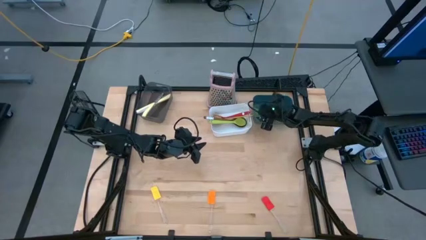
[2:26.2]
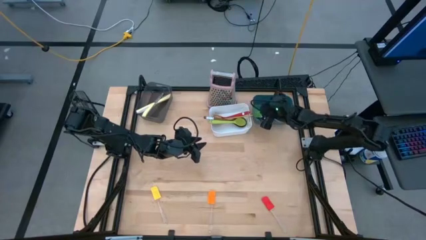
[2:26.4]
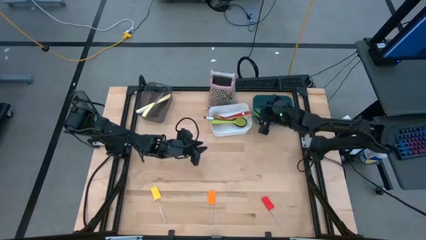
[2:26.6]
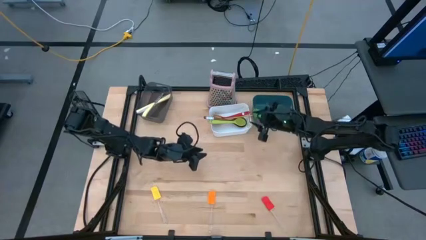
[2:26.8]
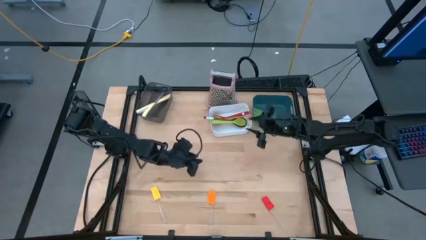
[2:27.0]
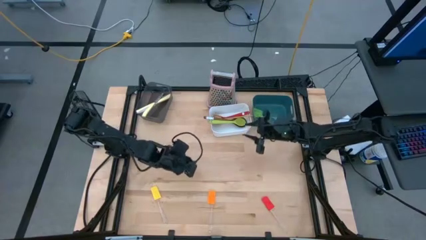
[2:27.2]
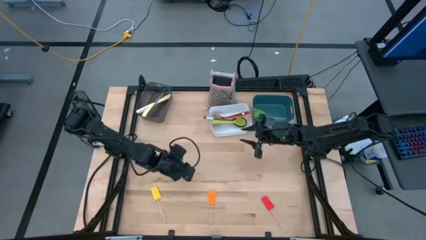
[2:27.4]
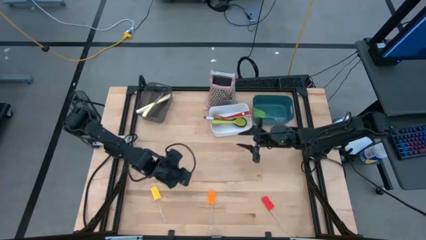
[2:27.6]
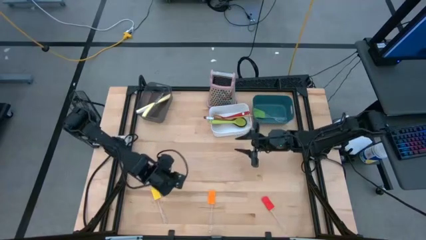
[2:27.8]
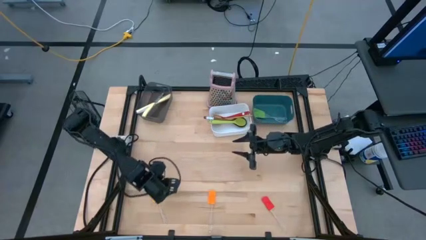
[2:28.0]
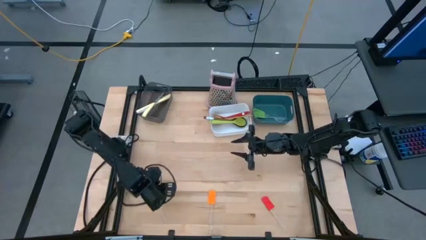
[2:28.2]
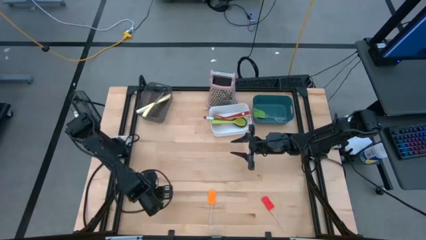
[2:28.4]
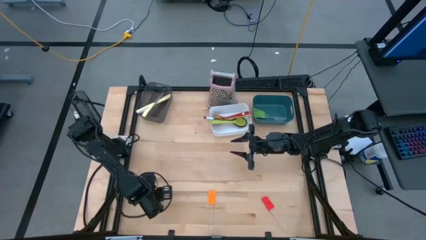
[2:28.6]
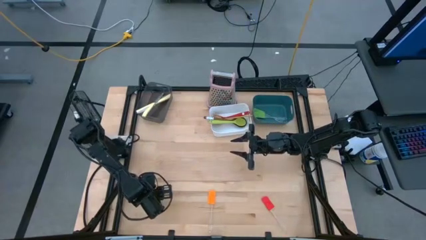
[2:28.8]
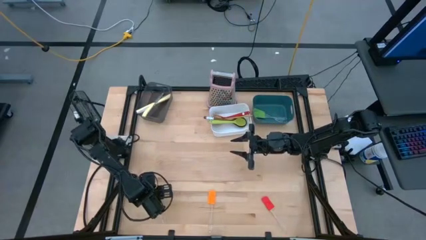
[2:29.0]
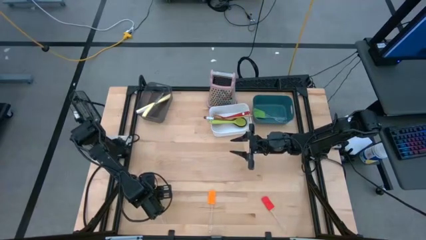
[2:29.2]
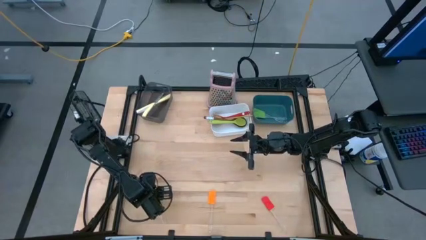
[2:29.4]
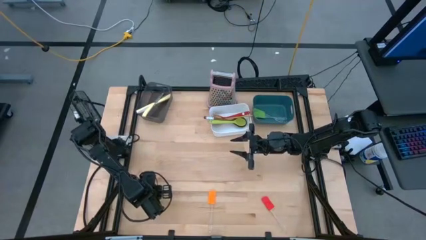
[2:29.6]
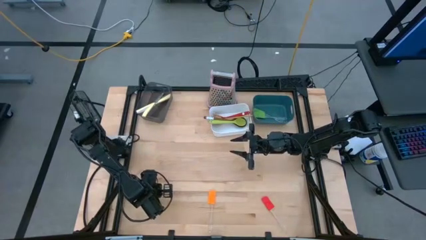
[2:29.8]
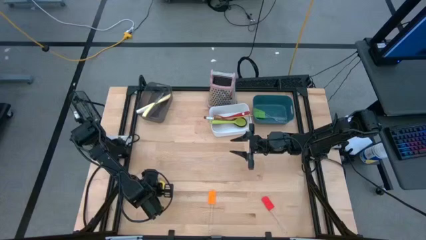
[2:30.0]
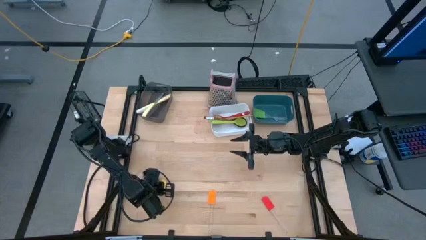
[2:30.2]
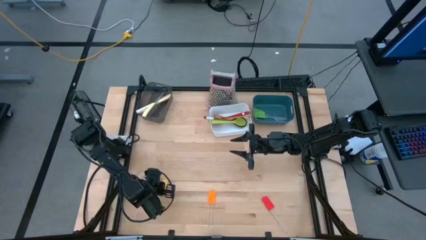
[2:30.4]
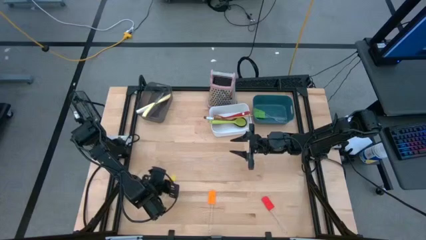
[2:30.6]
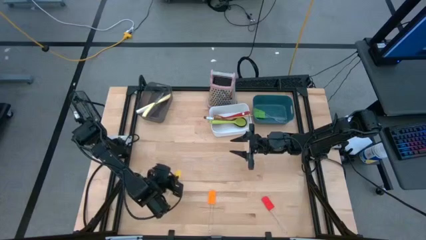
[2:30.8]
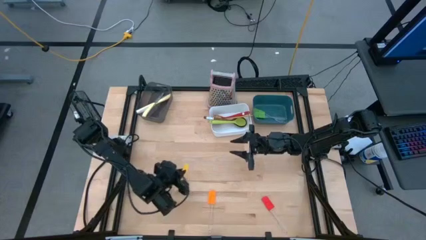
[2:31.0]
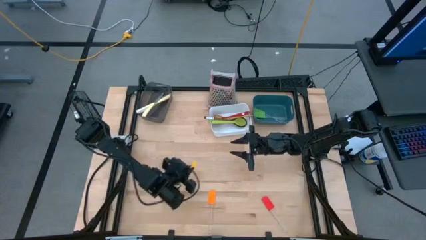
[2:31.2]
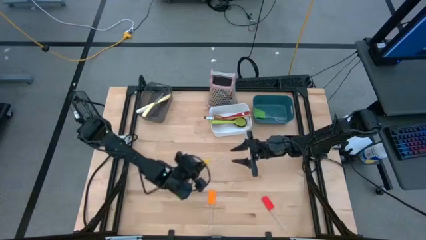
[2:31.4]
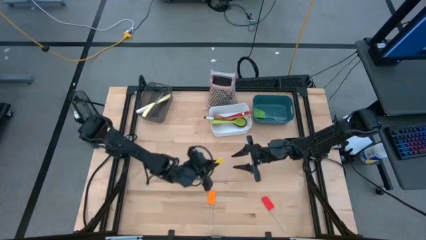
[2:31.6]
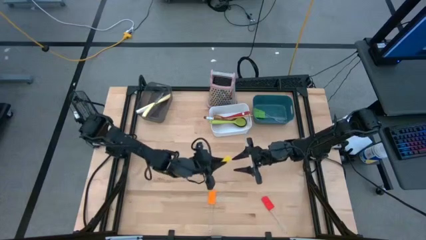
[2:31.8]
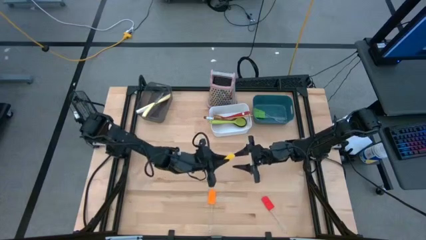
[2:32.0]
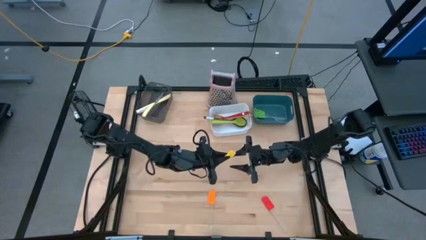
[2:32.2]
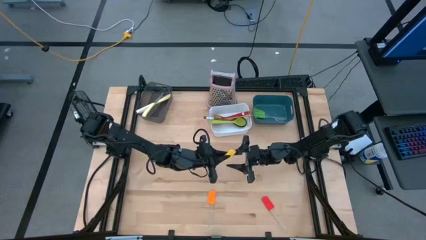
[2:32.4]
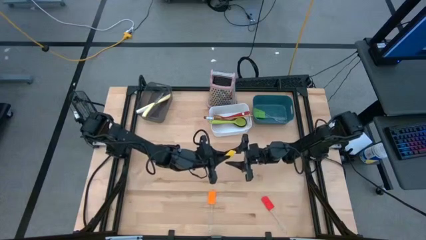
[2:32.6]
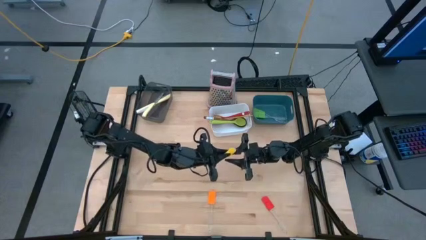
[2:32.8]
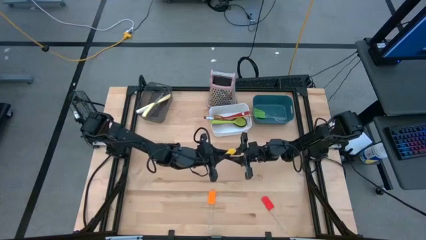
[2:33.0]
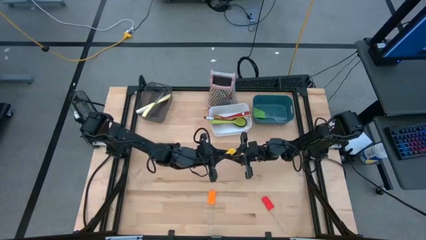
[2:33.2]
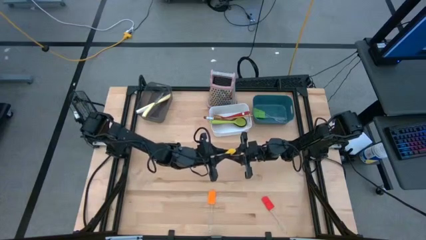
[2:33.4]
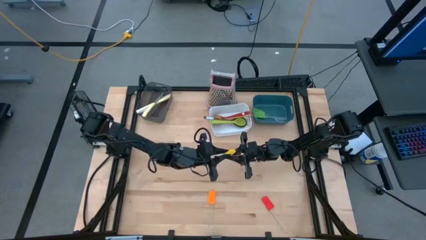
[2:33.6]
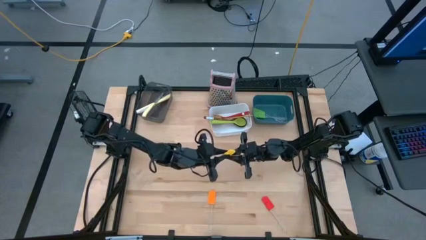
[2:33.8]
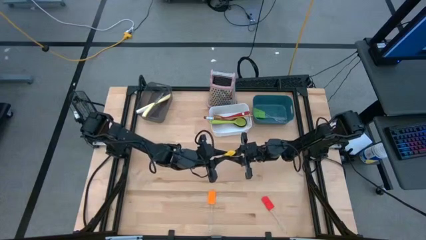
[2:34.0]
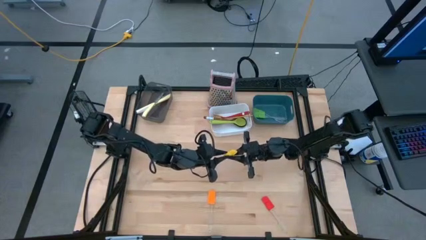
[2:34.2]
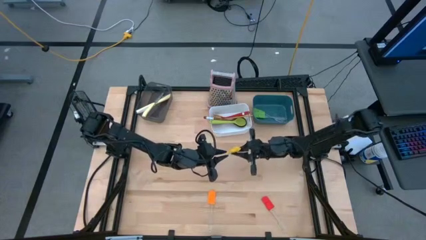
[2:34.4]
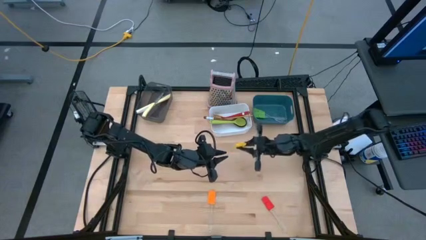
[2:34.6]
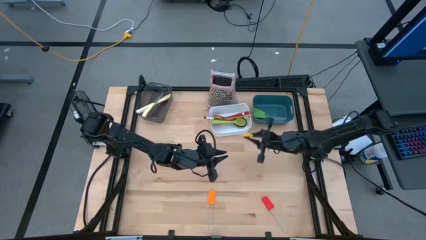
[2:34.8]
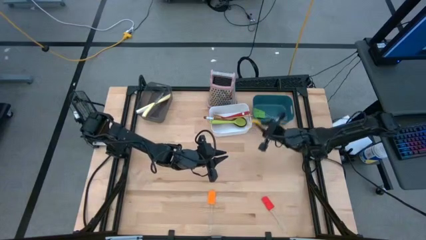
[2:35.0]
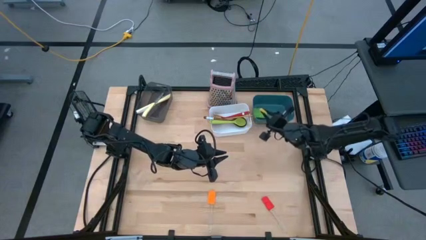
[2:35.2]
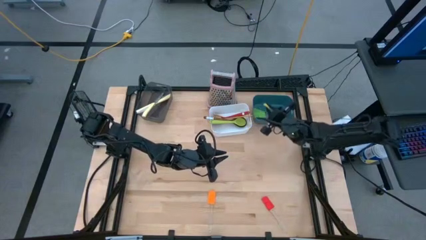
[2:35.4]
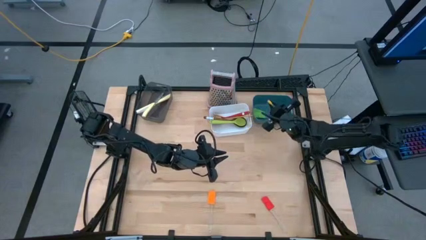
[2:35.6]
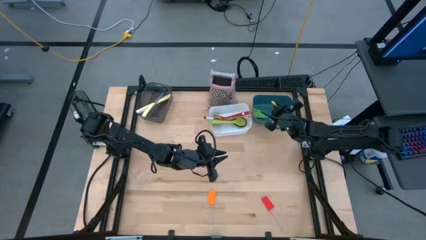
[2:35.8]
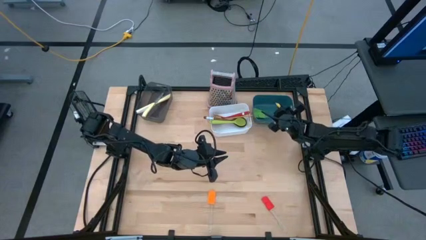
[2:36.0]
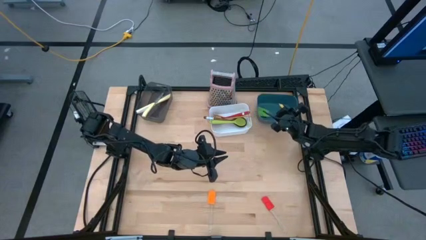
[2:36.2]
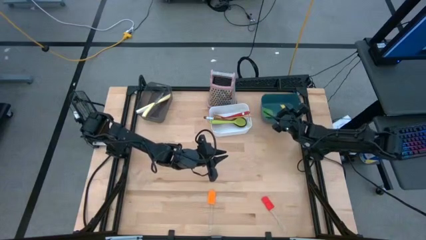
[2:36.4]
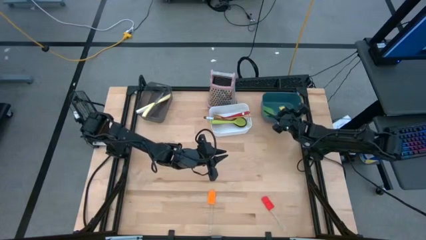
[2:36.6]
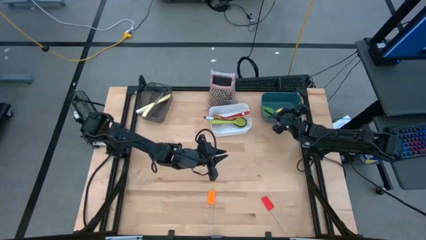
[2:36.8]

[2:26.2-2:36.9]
Task: Pick & Place Kitchen Items
Put the yellow spatula into the blue bin

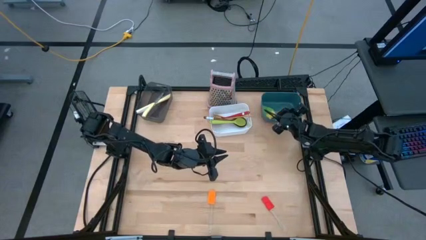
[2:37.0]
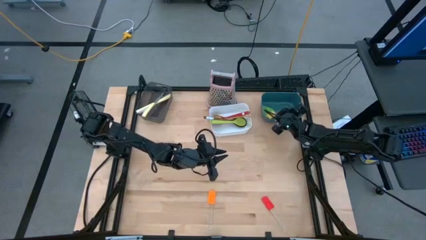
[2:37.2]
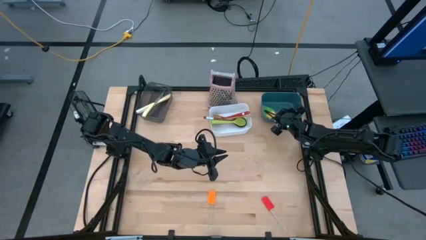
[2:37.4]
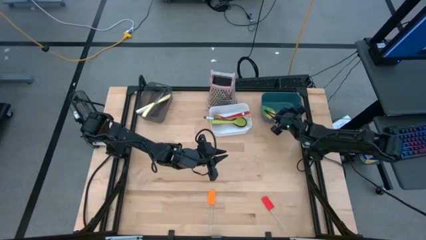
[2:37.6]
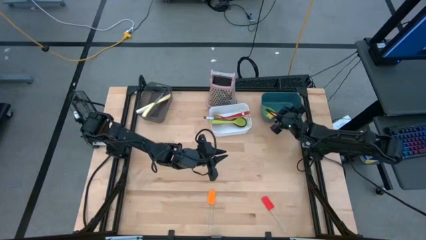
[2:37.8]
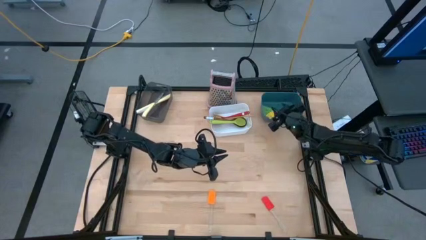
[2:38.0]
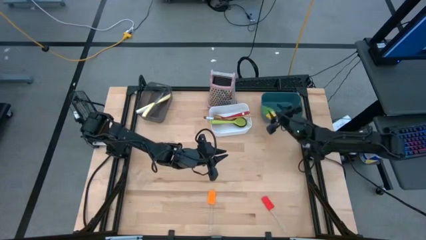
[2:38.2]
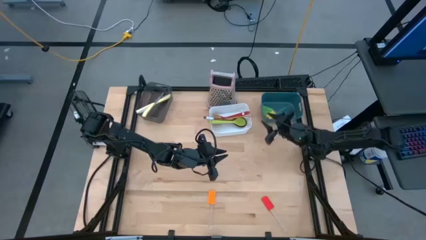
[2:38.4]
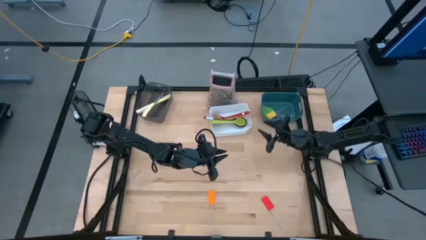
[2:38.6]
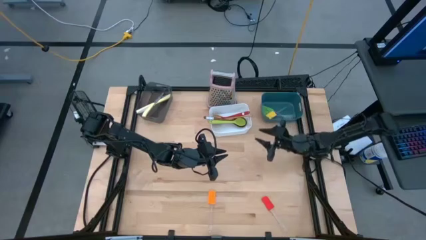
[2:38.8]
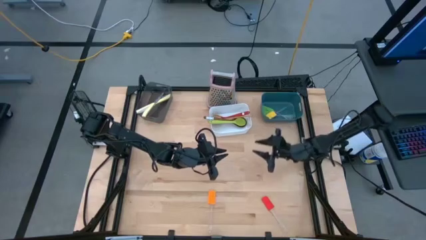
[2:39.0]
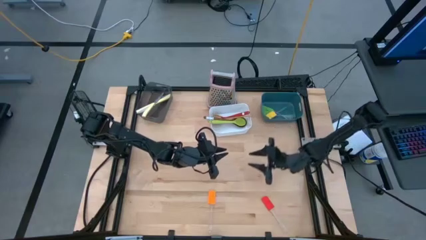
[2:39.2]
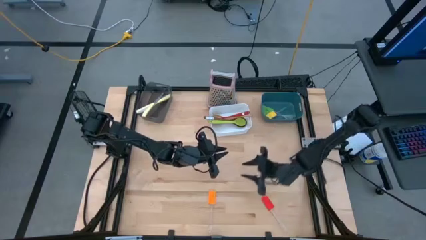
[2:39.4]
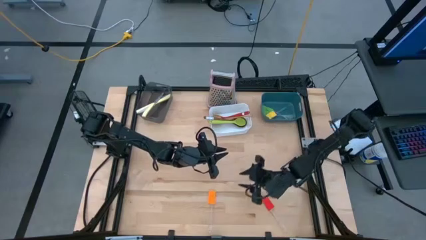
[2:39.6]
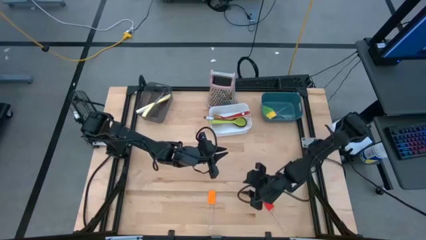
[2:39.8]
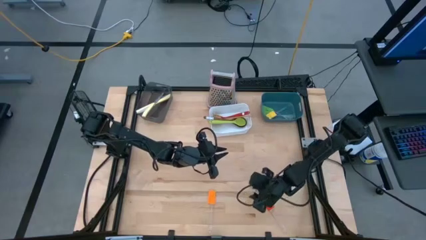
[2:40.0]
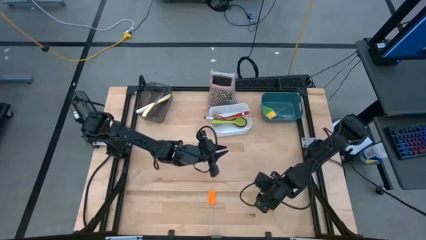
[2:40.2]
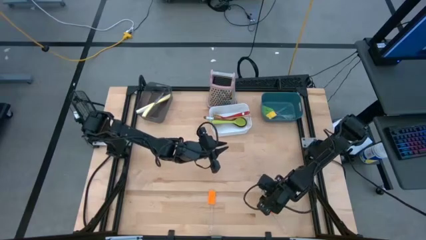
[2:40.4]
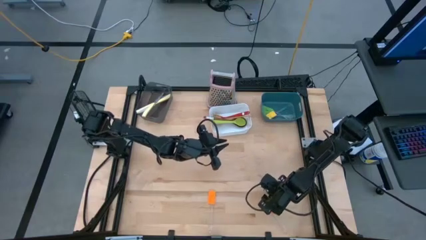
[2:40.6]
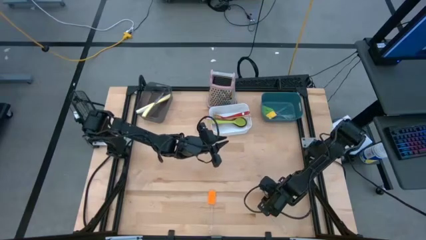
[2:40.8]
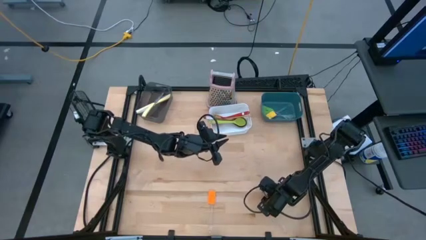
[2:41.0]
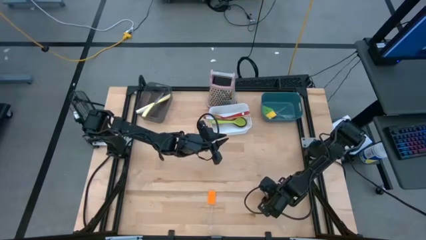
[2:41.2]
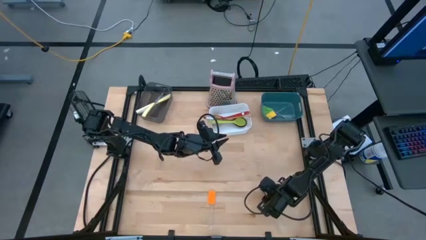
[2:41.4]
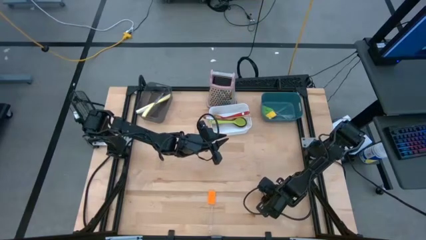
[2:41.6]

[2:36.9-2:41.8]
Put the red spatula into the blue bin

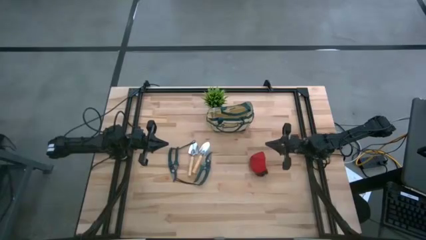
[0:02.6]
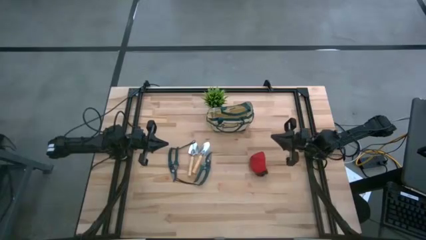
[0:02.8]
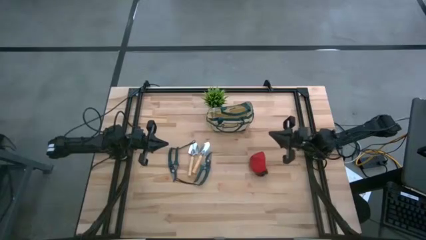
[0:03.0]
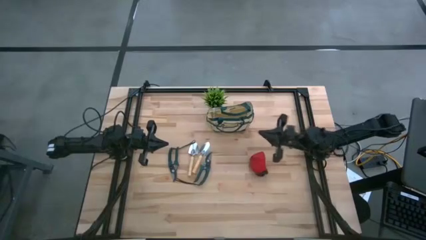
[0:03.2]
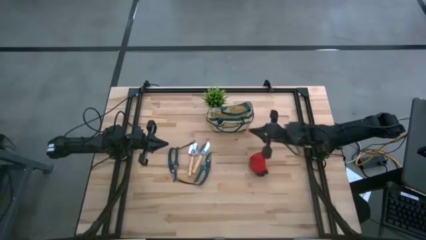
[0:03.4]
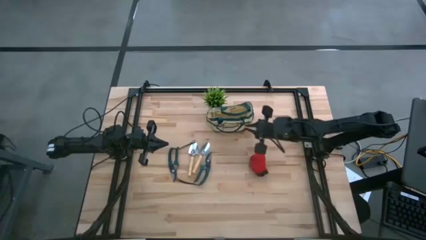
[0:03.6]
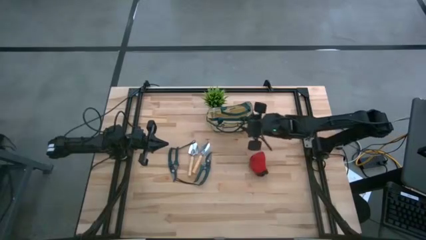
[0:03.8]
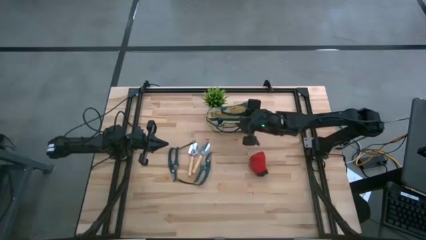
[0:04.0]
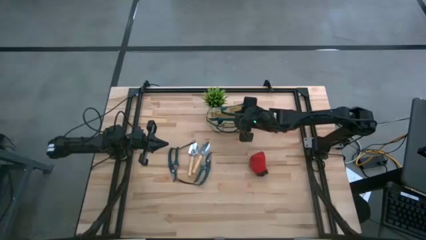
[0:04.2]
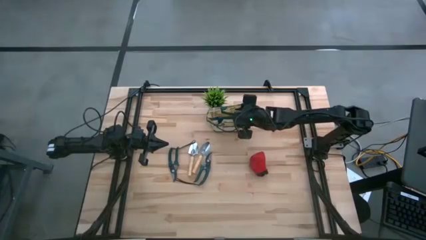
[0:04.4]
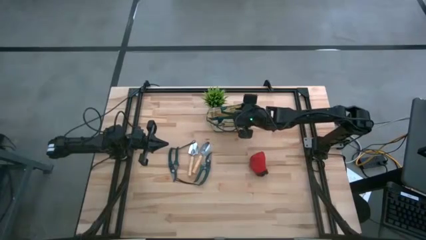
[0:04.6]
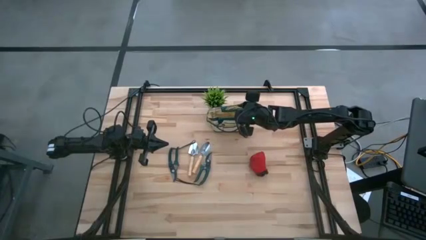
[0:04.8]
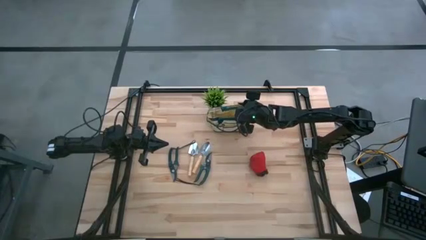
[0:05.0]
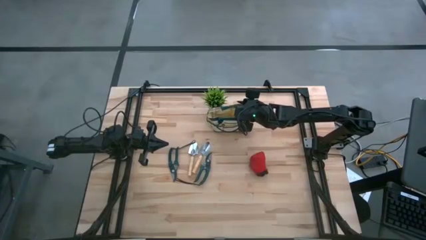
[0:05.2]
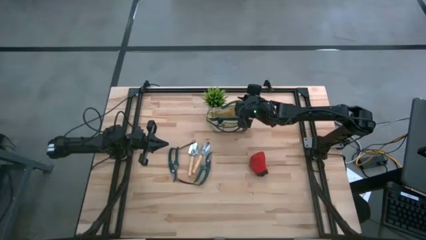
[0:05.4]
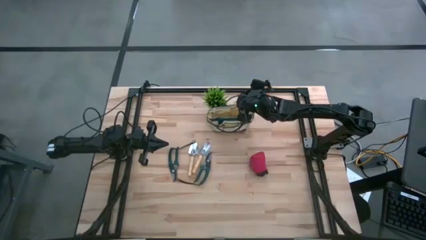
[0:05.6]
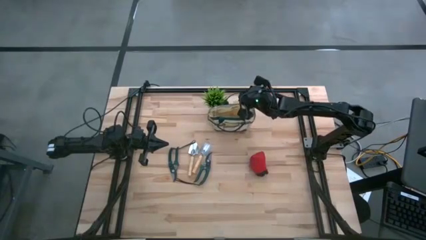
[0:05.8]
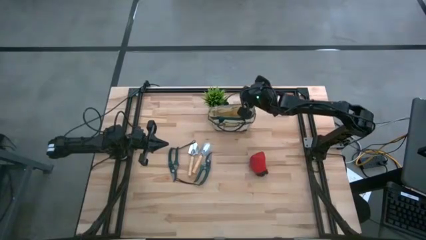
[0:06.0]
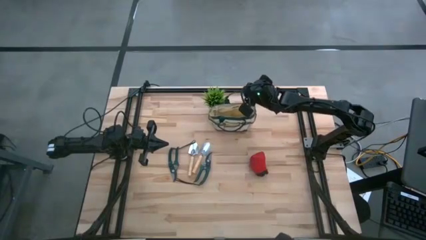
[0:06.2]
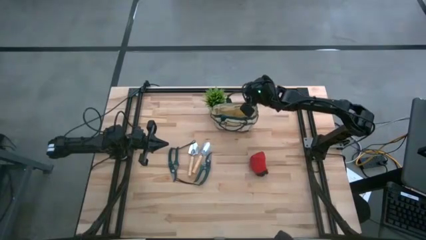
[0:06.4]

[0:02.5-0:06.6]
Task: Pick & Place Garden tools in Gardening bag
Prepare the gardening bag
